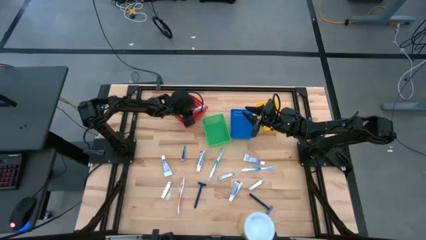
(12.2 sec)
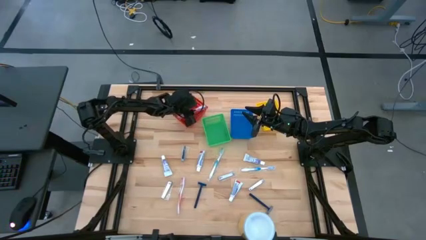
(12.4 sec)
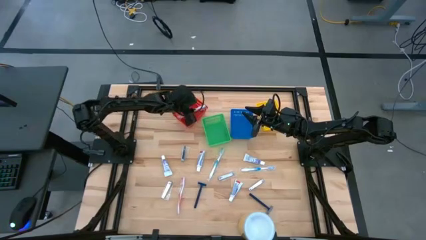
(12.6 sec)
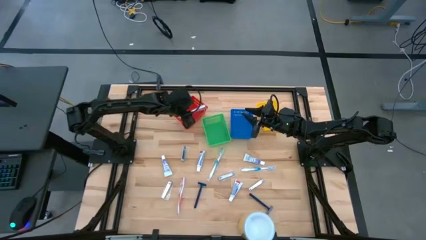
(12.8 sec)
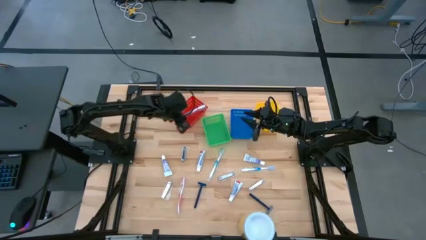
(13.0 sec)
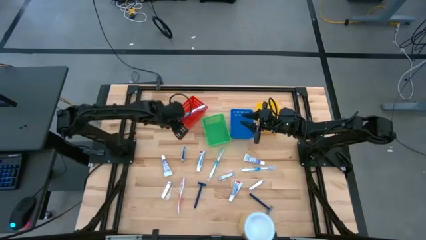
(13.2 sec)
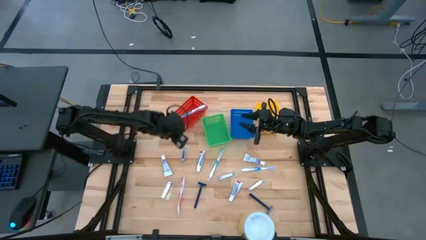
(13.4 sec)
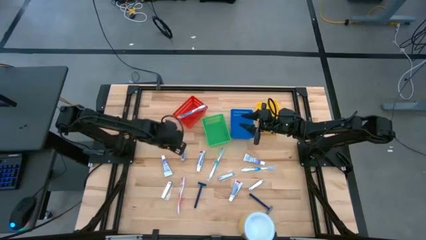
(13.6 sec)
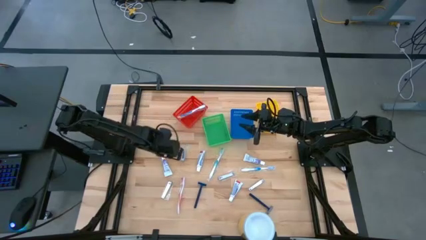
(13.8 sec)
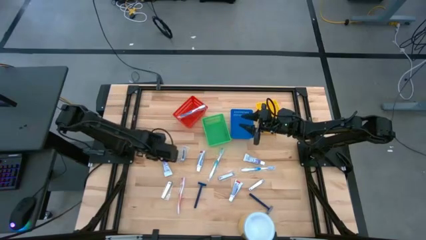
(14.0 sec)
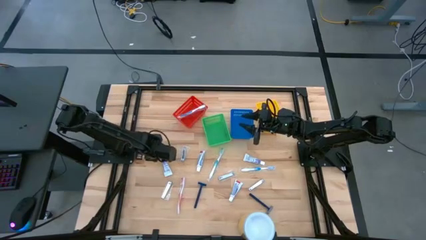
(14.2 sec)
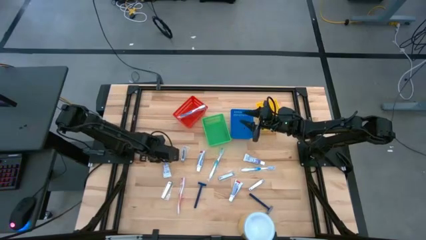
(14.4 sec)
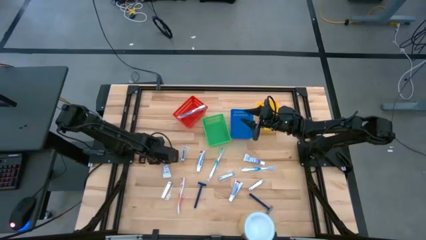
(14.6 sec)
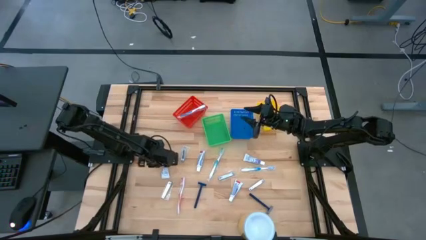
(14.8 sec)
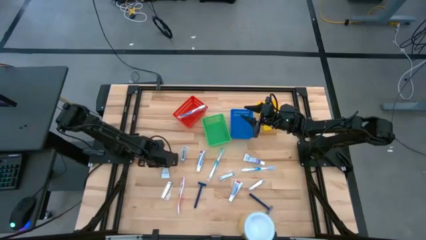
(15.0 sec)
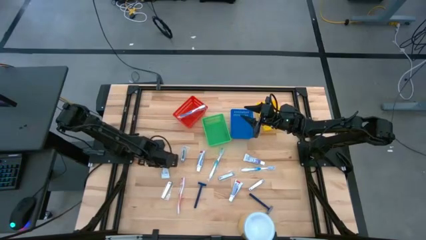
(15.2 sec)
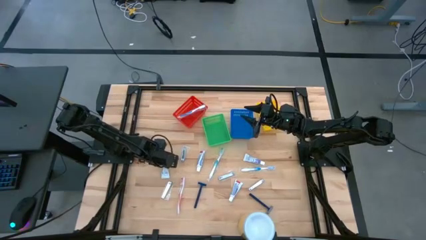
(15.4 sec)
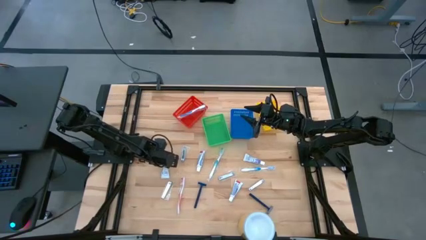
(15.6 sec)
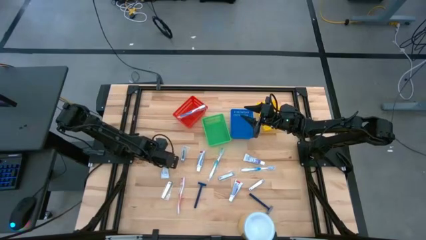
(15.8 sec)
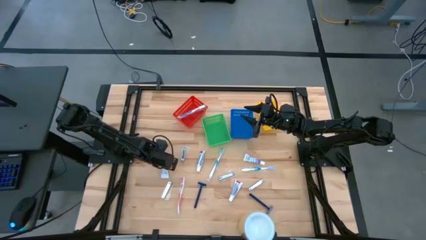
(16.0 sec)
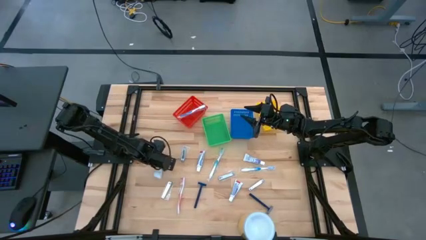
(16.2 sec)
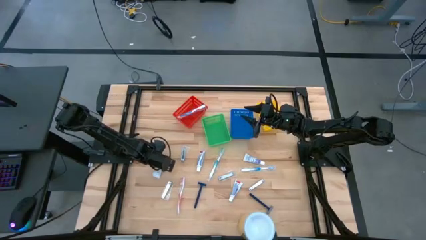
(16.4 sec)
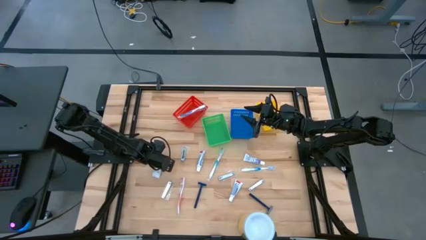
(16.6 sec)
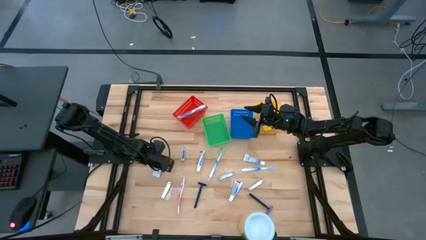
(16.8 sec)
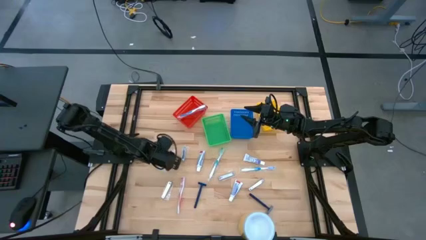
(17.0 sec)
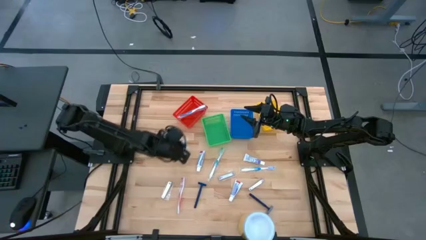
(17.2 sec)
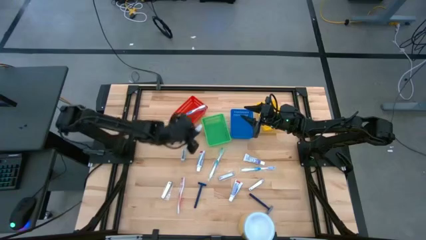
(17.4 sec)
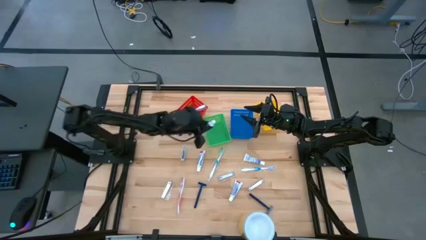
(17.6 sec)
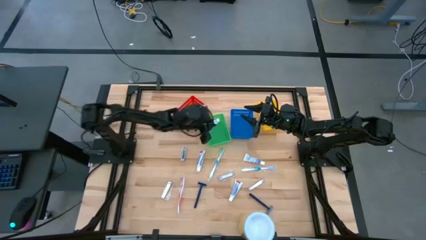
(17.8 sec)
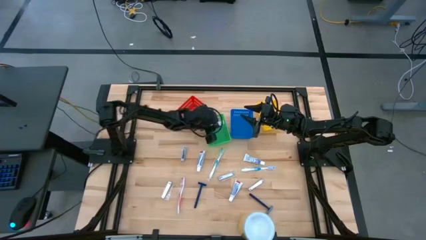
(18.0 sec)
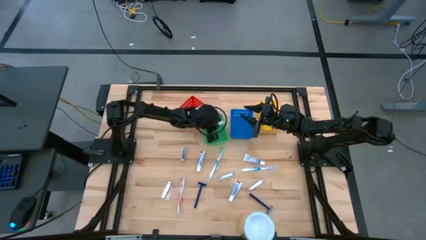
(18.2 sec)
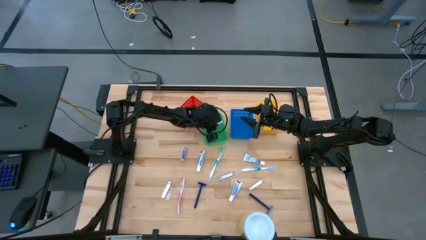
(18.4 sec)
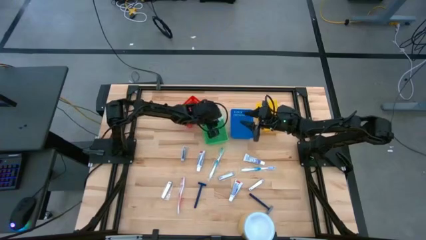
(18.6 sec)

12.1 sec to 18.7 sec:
Task: Pick & Place Travel size toiletries
Put the white toothpaste into the green bin

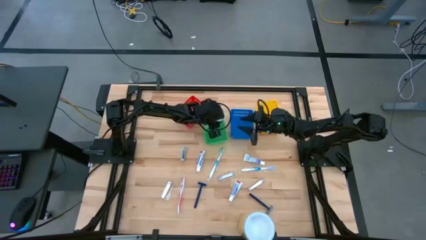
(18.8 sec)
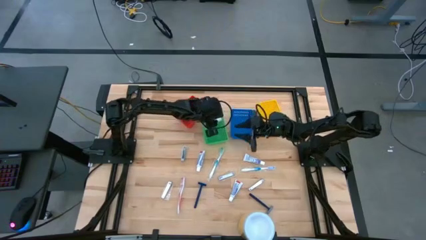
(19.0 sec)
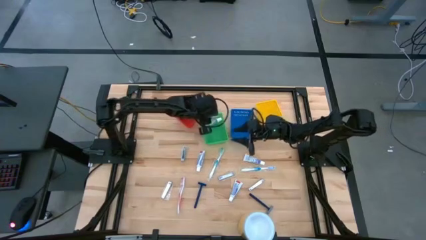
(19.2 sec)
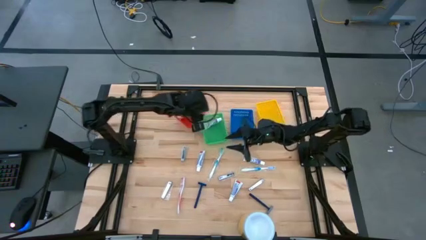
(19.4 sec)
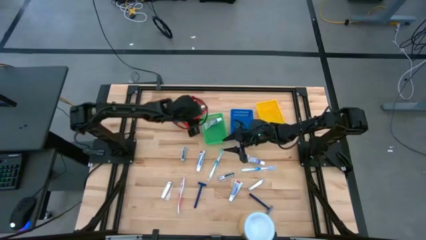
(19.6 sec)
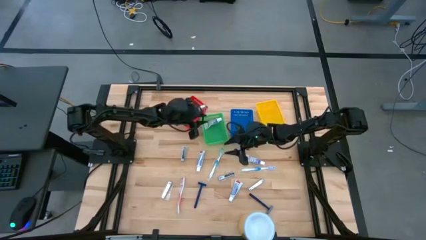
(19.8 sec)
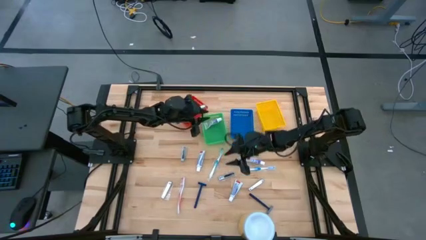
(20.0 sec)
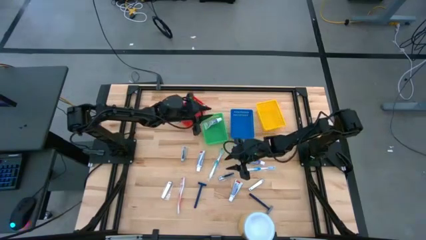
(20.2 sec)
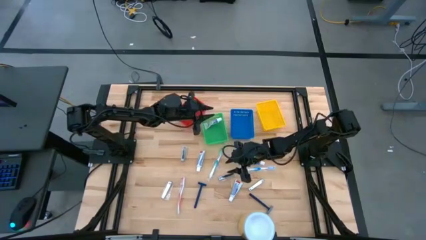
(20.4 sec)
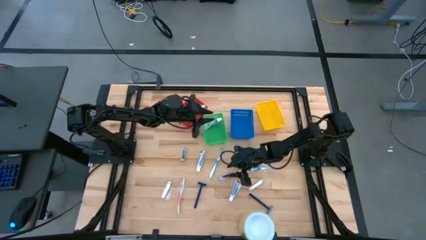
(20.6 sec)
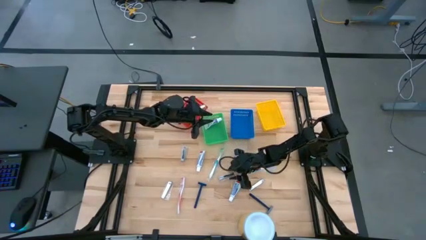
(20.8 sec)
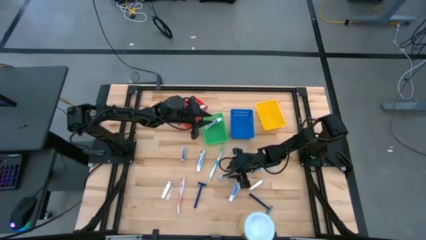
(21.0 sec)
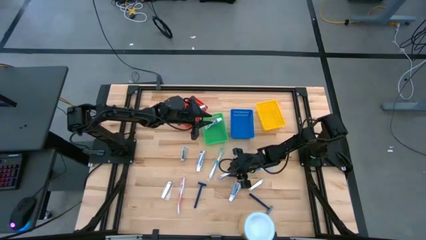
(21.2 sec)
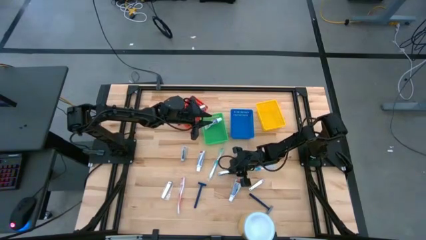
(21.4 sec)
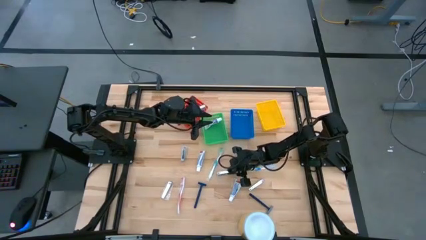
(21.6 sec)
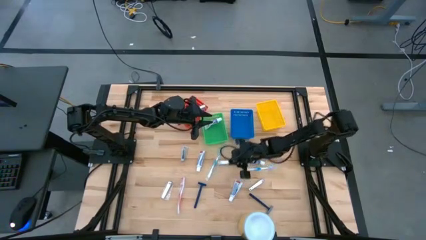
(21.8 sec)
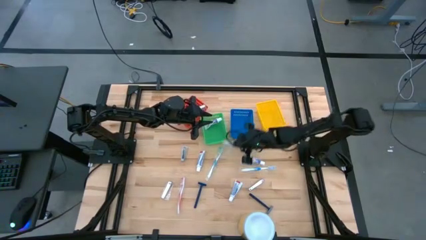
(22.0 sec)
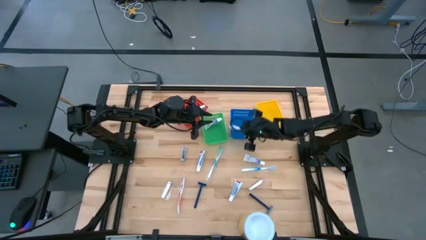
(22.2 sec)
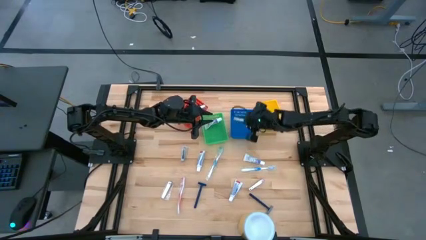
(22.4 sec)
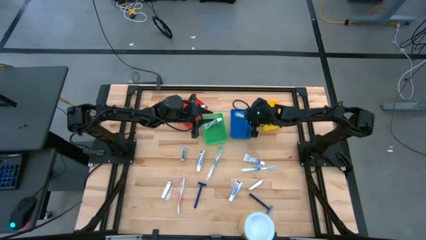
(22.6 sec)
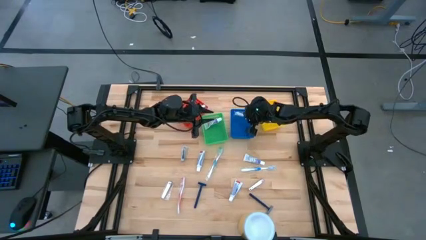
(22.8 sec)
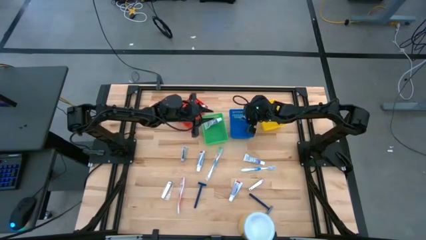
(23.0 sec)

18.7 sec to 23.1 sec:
Put the silver nail cutter into the blue bin

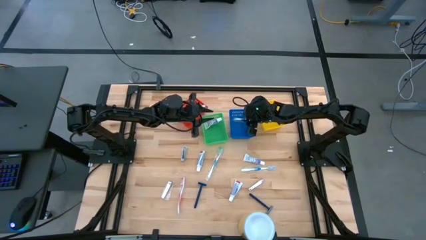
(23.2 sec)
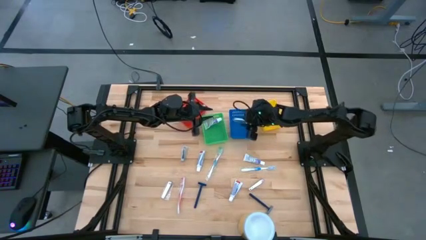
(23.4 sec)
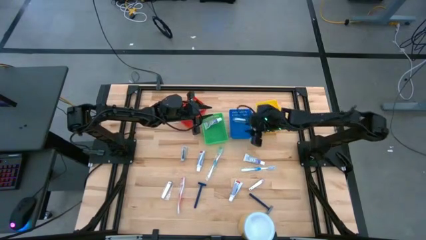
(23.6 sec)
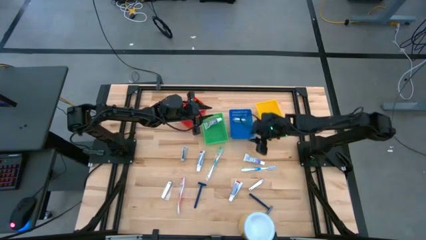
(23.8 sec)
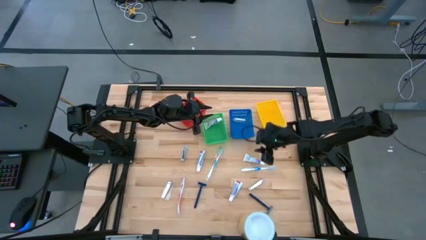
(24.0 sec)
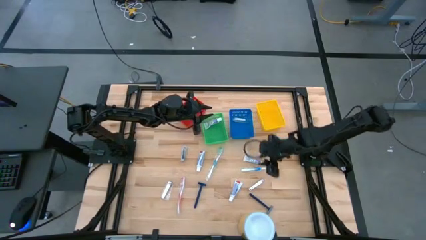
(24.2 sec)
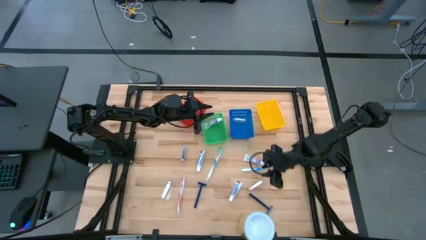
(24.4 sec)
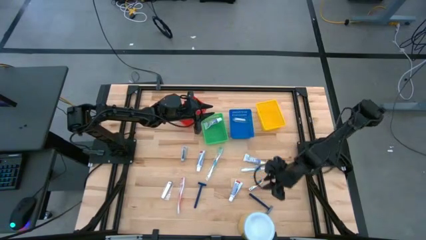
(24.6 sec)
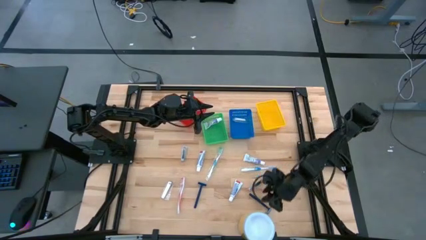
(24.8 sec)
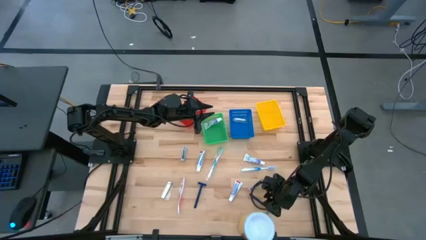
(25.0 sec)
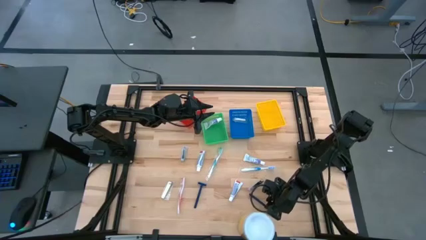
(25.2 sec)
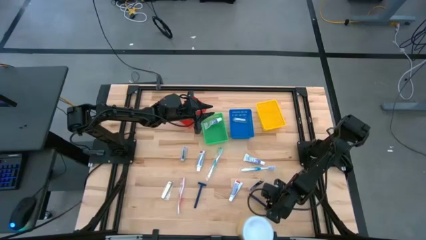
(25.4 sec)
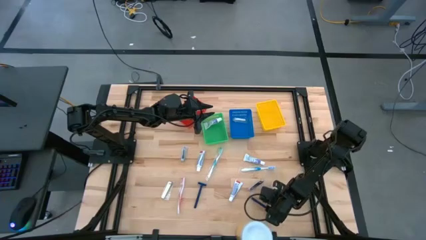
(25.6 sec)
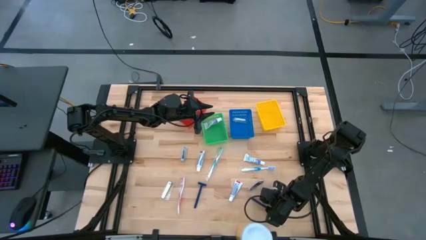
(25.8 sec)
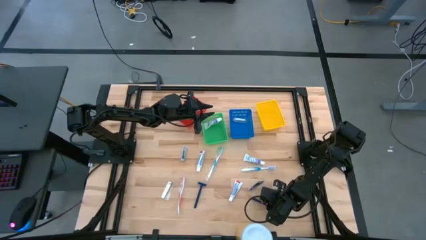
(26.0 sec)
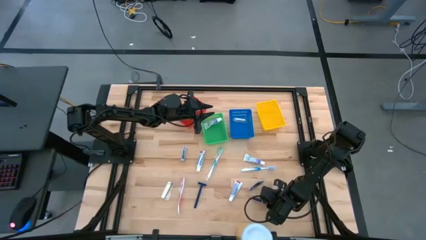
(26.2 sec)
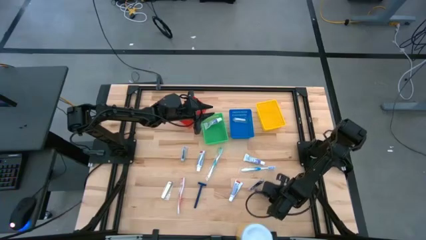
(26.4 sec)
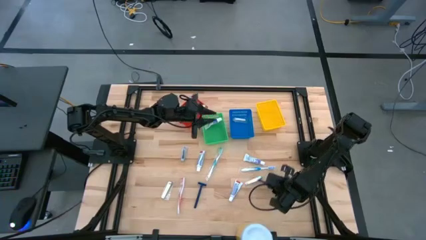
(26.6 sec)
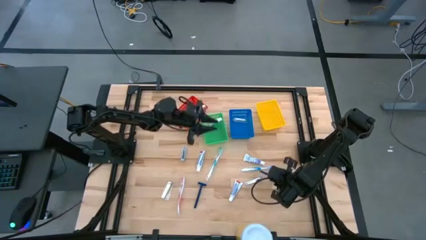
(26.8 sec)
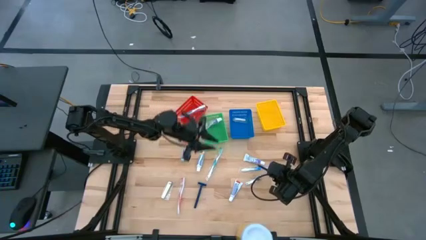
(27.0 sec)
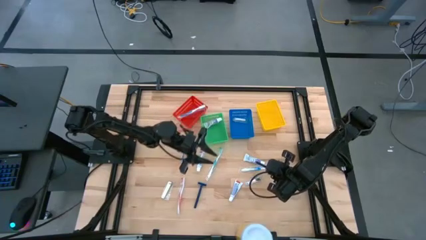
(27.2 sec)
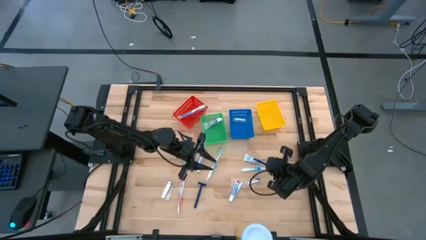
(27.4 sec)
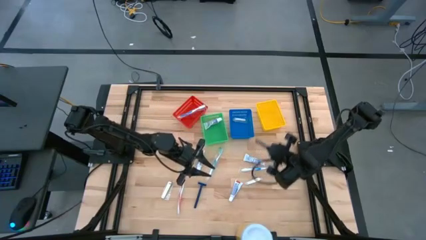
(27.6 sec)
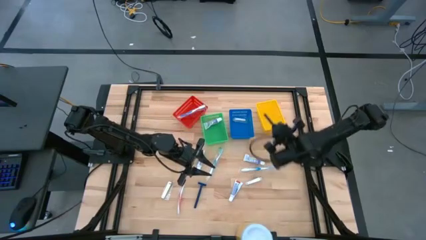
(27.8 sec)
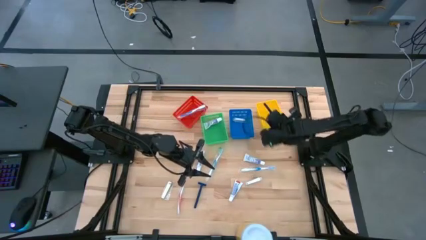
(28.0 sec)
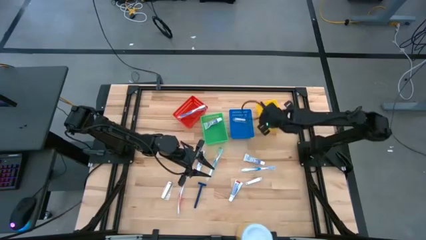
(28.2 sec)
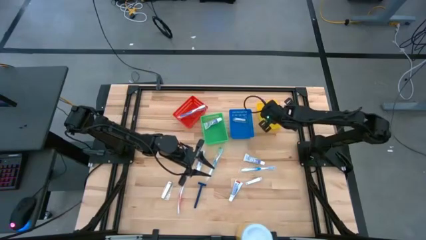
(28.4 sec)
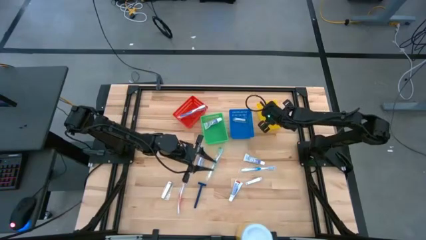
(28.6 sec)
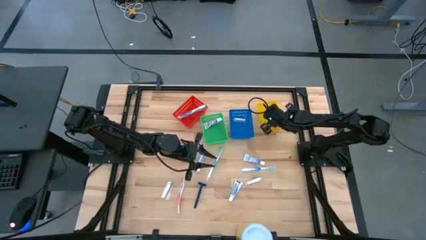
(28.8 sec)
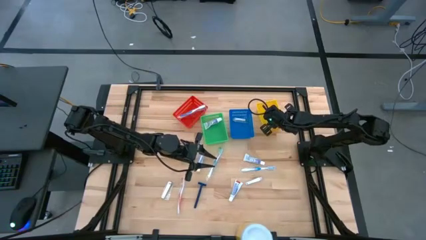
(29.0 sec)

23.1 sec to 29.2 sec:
Put the blue razor into the yellow bin
